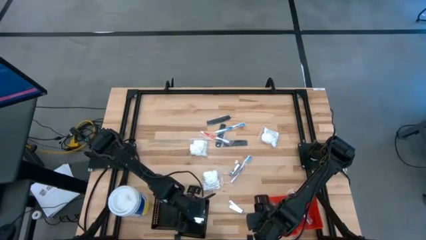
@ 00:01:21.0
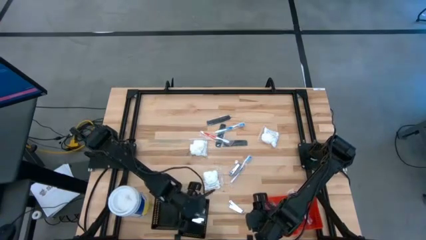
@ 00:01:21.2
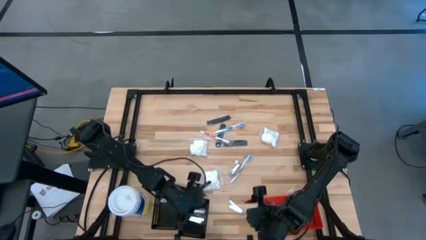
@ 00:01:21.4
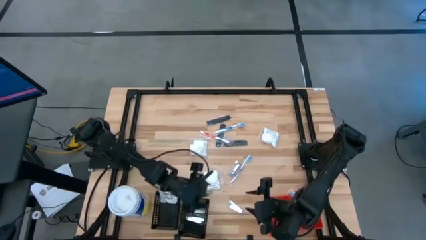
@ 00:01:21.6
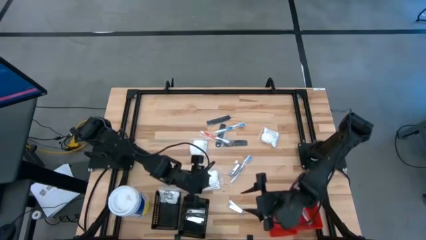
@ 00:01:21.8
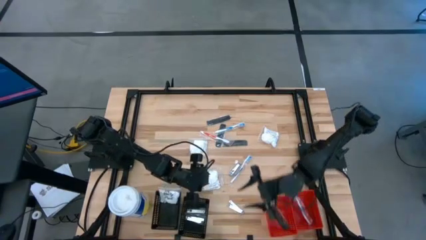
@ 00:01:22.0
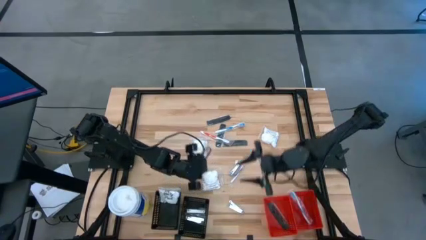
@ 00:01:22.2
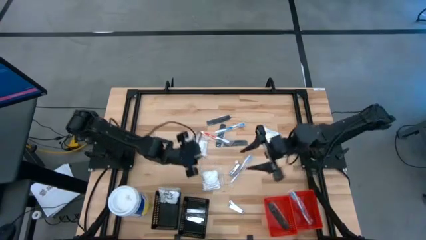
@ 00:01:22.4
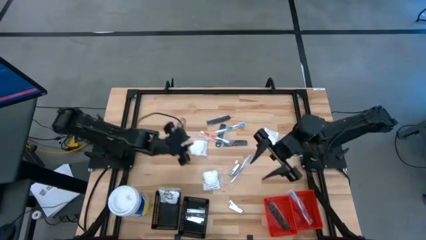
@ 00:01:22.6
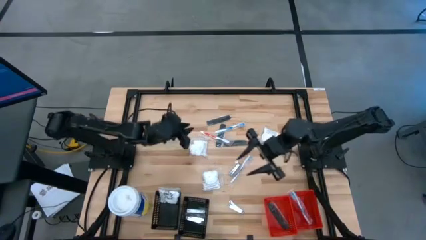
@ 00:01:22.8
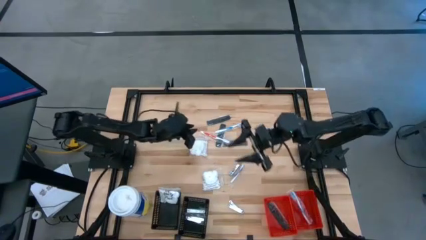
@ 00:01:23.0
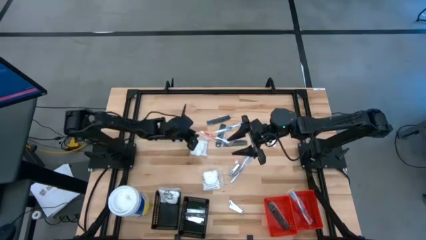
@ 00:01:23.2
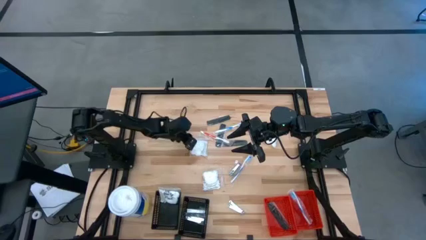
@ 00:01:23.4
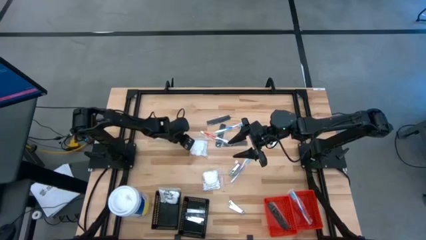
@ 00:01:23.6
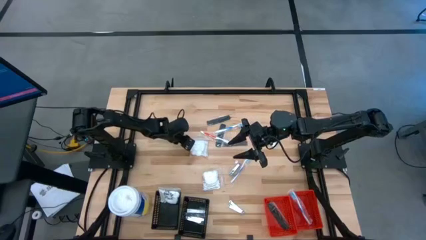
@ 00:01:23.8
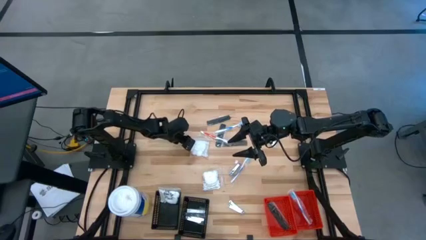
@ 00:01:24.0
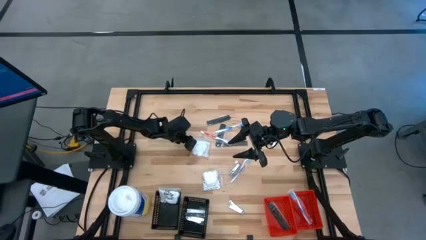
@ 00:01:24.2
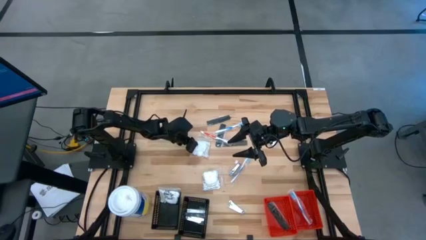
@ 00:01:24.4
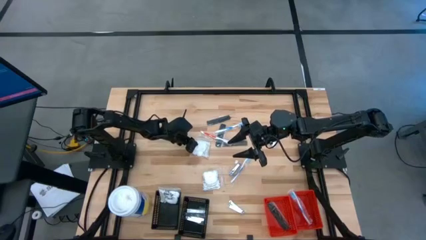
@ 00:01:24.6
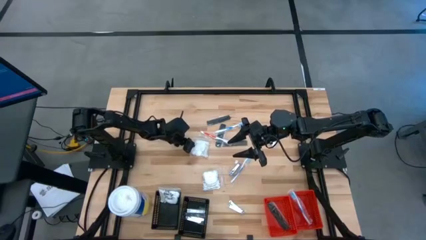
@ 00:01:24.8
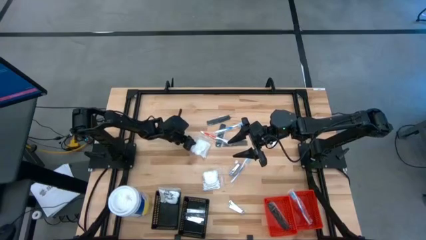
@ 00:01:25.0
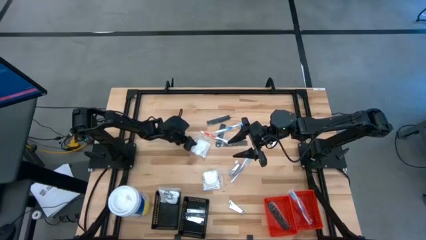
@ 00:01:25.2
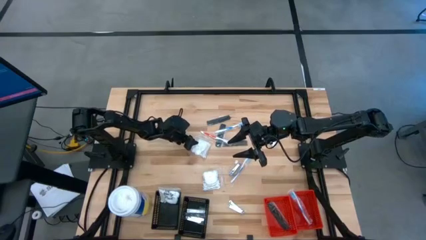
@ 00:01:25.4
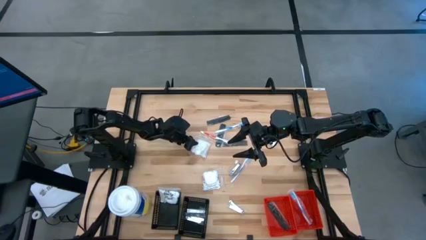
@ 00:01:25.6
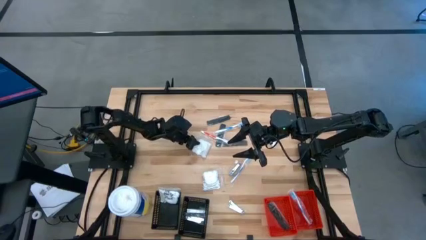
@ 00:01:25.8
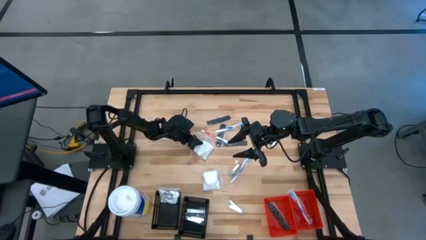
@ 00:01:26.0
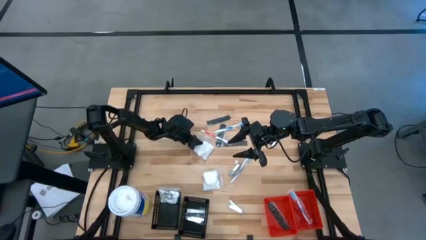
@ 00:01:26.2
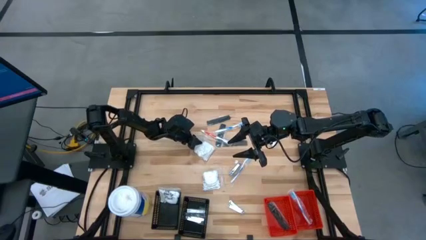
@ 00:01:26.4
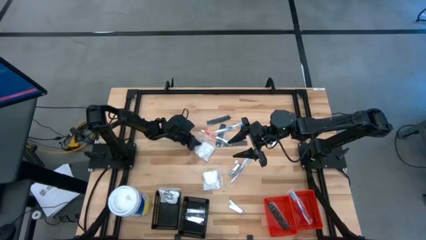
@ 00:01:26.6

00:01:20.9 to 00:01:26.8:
Task: Pick & Place Travel size toiletries
Put the cotton pack into the left black bin

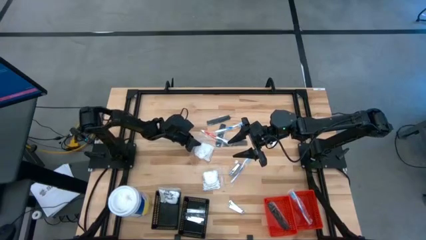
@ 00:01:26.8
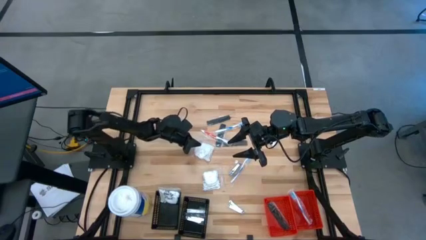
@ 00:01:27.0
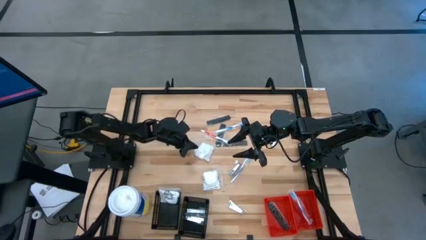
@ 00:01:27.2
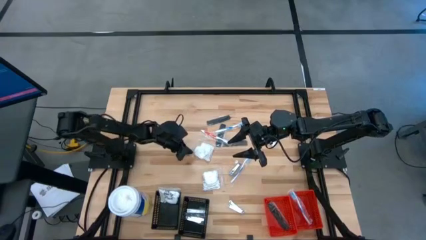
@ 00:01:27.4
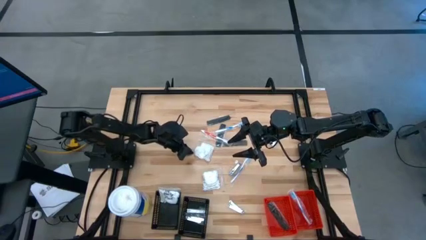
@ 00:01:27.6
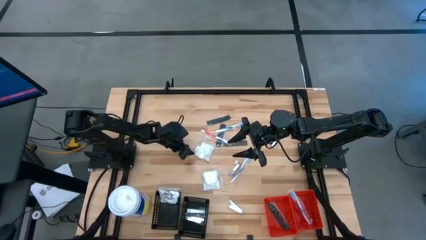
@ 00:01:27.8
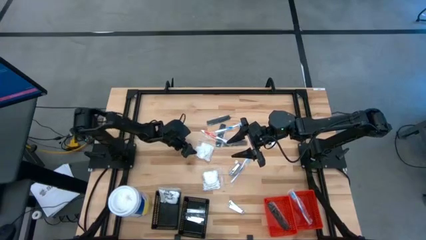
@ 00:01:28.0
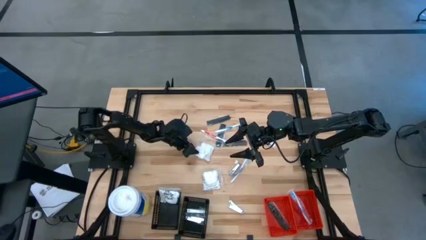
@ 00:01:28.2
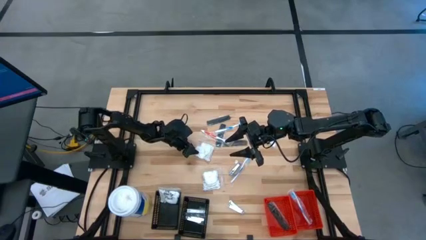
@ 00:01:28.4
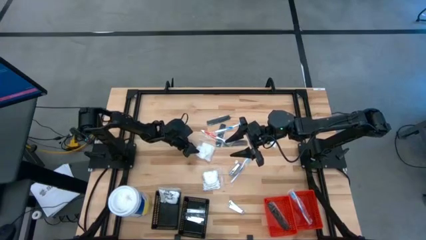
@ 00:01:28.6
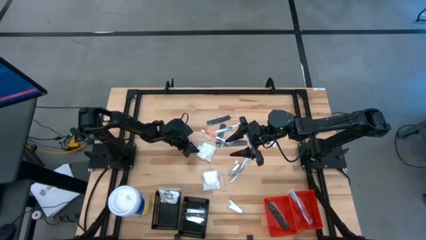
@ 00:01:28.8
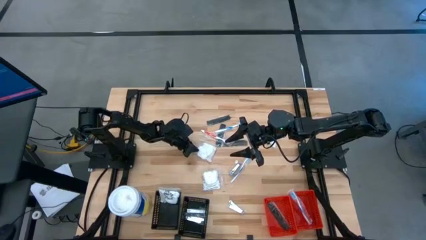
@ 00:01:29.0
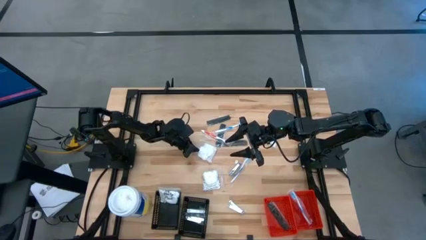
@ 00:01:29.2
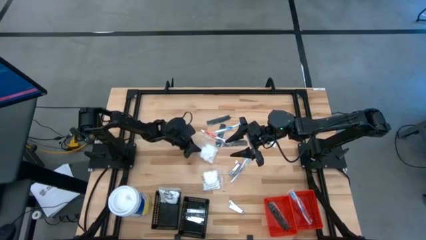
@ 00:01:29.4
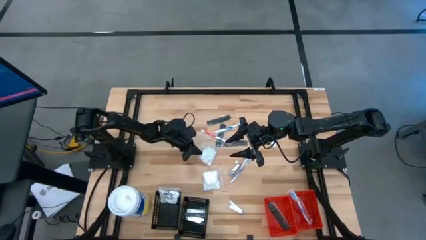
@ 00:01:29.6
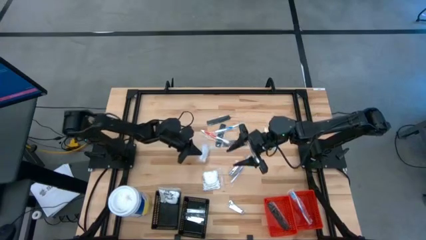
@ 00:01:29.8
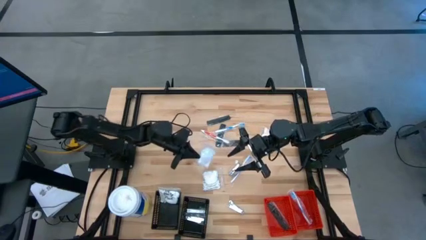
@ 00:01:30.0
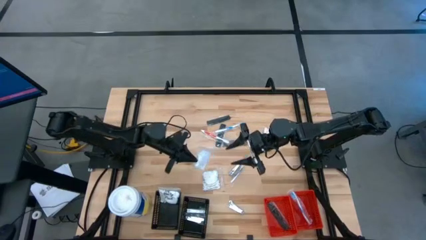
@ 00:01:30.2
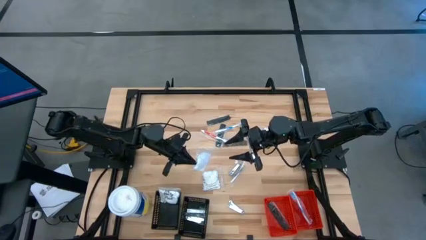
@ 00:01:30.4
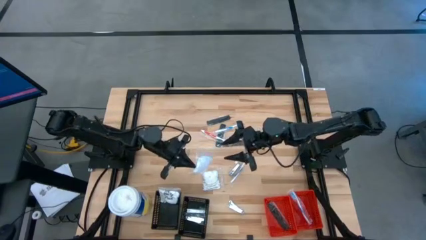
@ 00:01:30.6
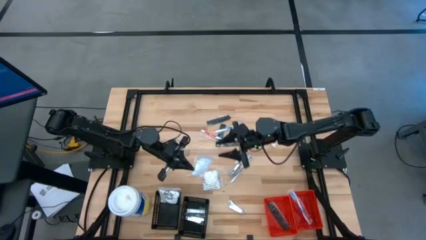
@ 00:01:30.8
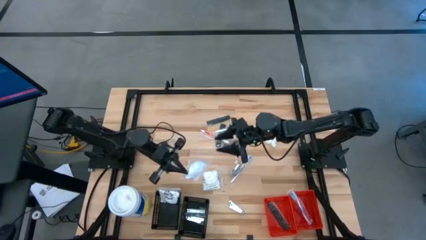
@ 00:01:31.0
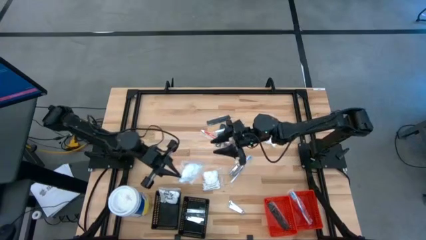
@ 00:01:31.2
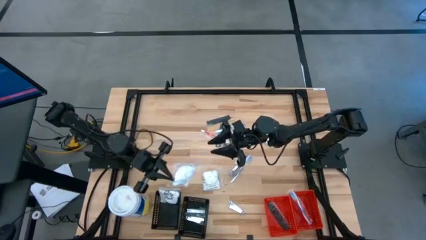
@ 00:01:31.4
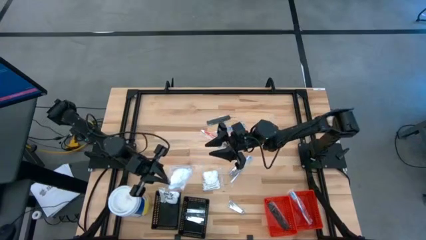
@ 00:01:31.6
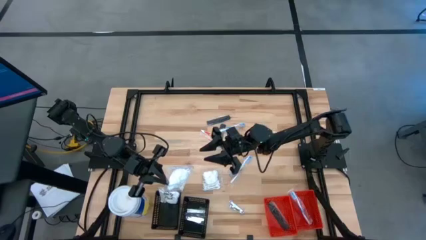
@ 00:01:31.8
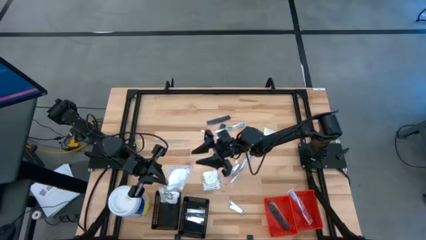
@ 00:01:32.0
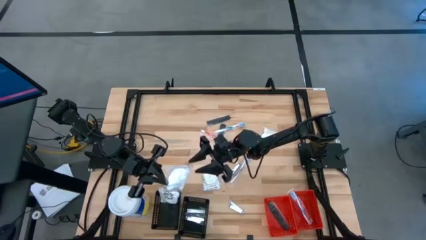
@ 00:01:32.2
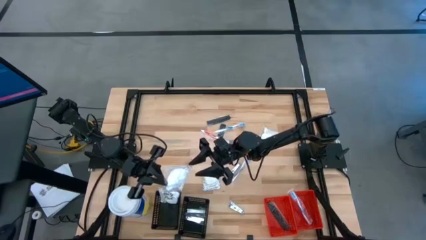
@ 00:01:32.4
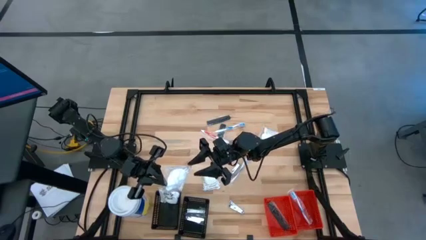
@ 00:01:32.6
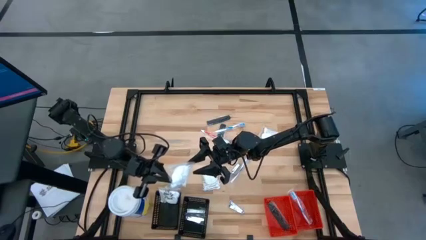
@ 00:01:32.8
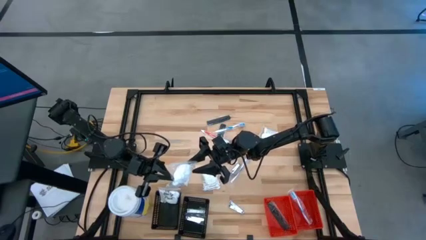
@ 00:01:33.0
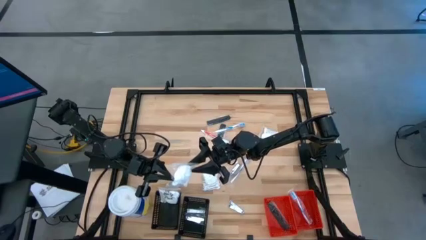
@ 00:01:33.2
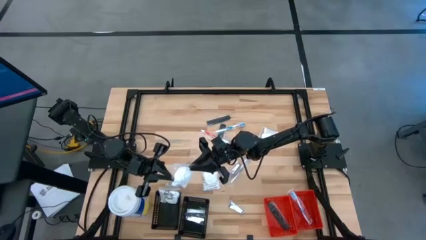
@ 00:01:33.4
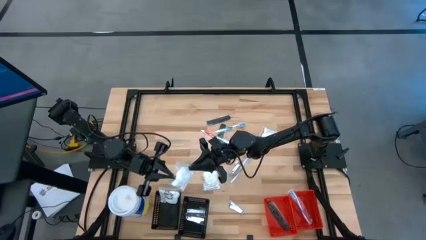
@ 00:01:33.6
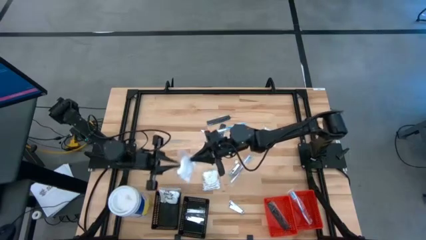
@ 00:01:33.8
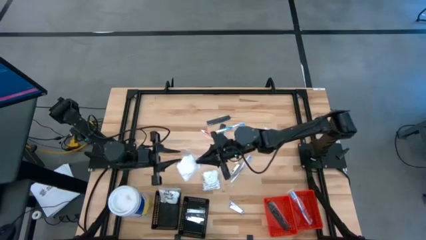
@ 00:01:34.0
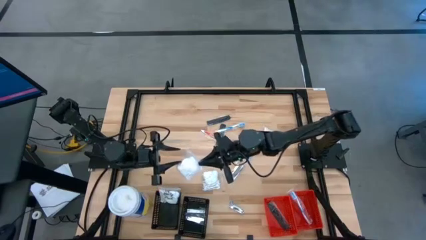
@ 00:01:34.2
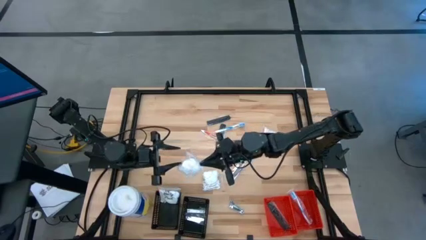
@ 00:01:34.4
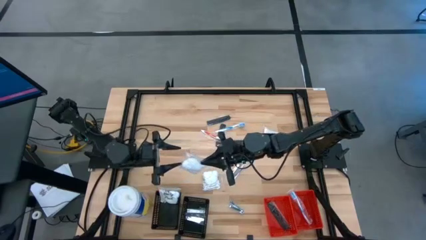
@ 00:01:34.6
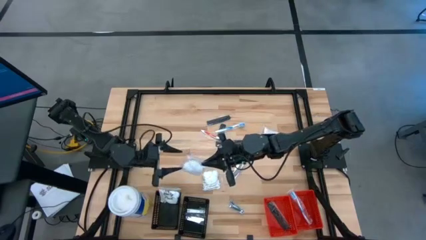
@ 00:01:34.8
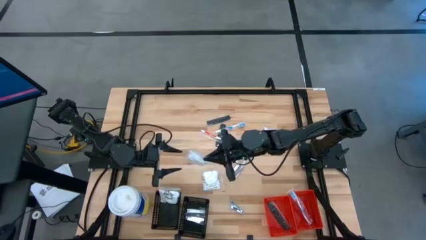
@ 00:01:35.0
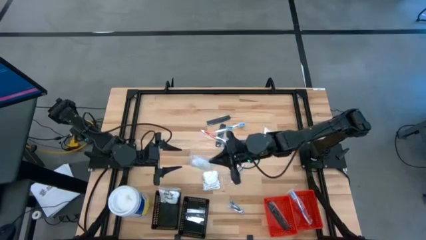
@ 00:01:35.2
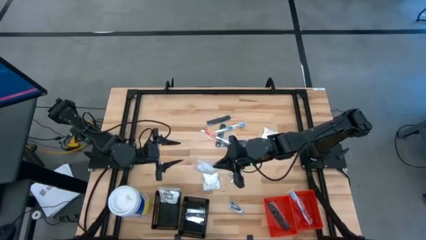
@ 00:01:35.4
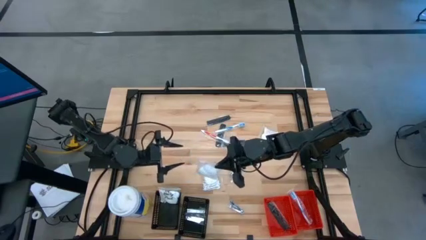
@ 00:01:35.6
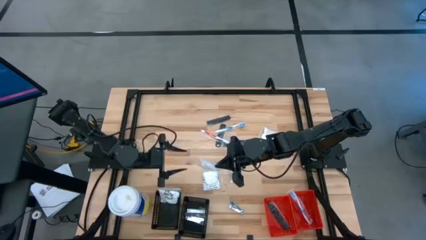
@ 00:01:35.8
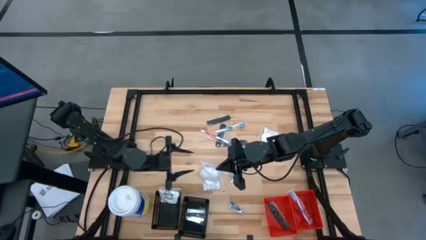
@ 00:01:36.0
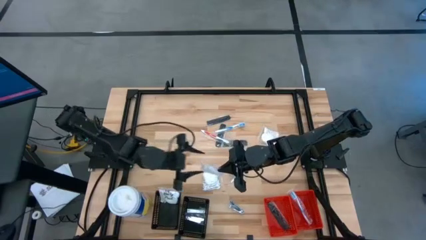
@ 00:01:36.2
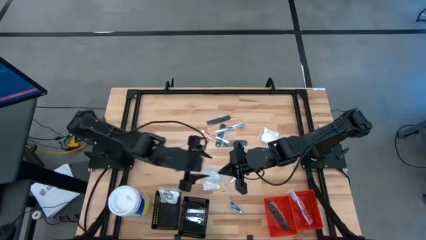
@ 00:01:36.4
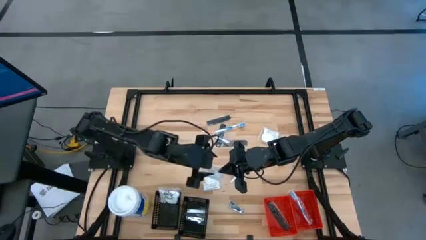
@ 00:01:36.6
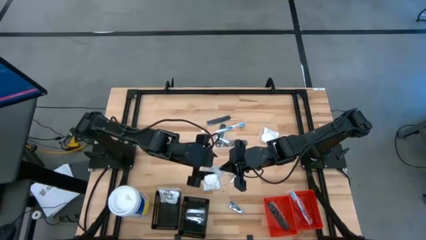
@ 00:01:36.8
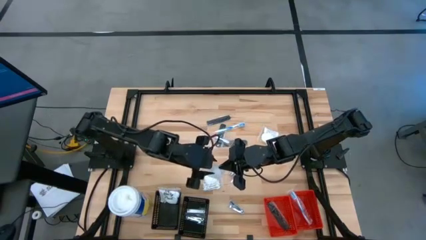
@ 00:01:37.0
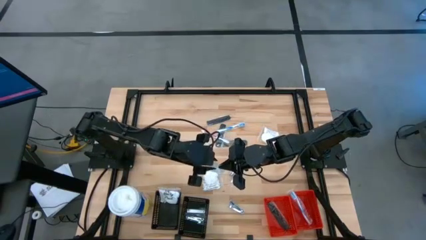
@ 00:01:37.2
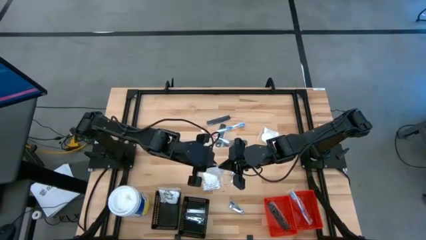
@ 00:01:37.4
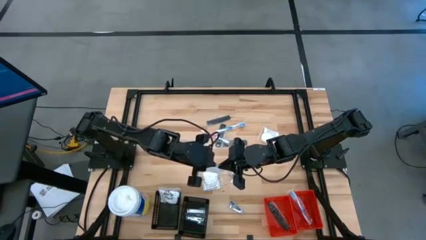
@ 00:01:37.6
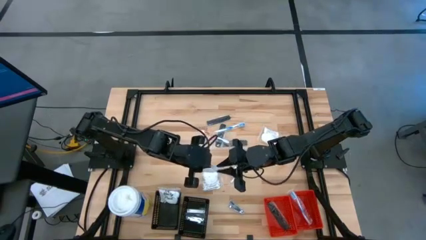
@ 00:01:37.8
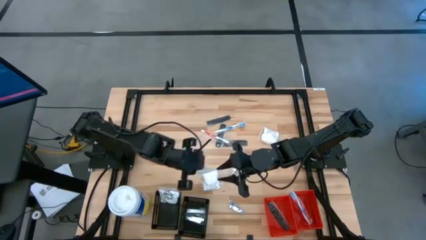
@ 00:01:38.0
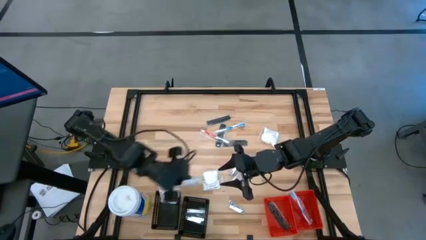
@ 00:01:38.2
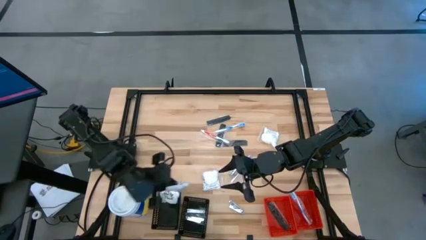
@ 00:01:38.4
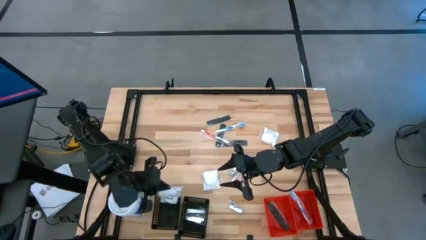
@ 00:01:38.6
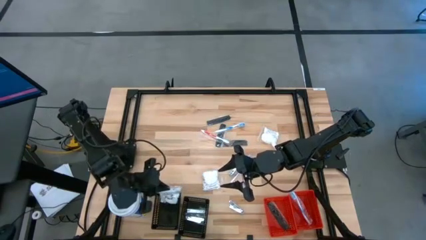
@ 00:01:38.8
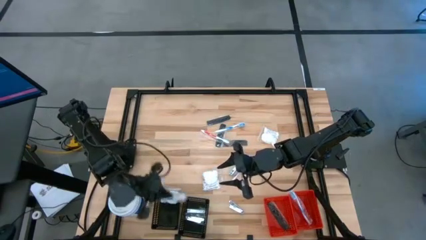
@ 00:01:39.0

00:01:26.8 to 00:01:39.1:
Put the cotton pack into the left black bin
